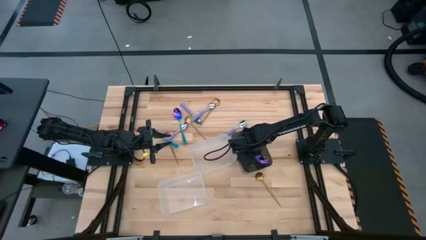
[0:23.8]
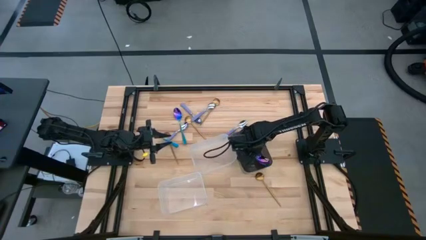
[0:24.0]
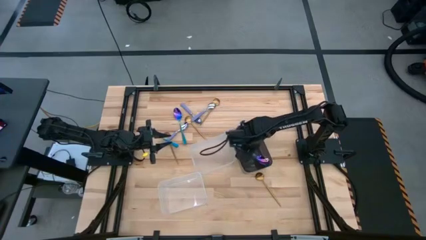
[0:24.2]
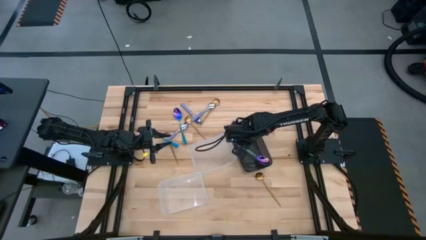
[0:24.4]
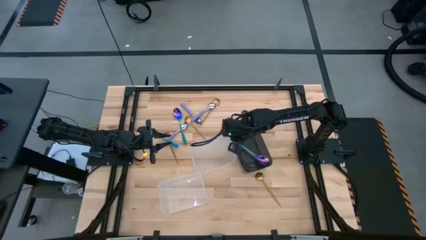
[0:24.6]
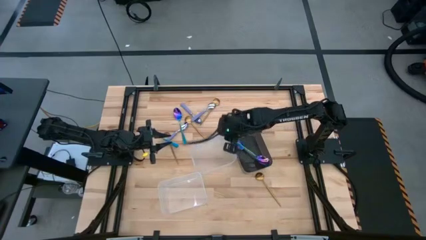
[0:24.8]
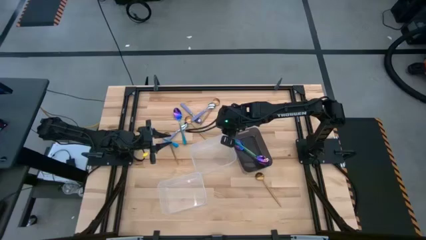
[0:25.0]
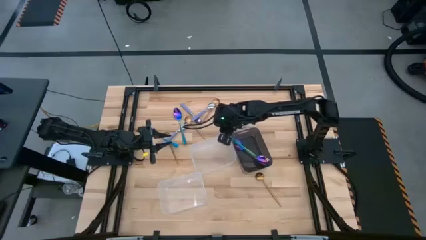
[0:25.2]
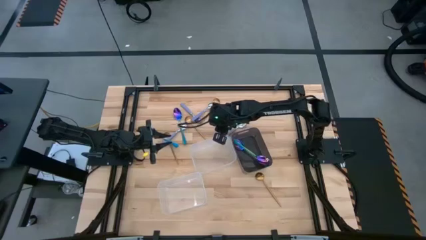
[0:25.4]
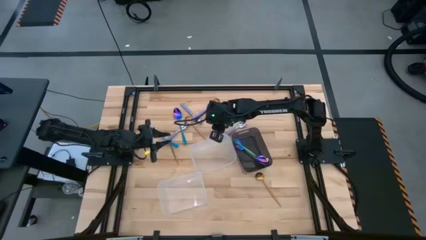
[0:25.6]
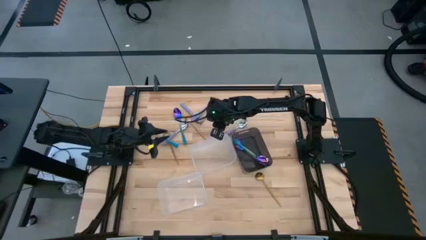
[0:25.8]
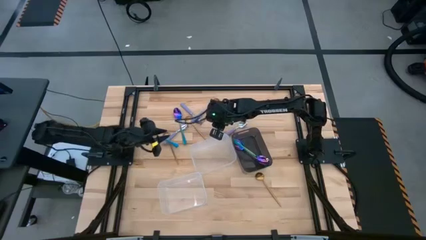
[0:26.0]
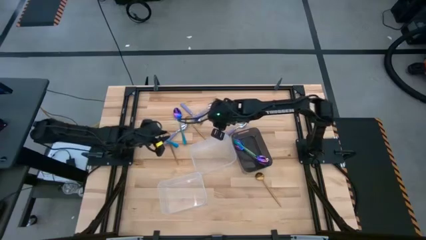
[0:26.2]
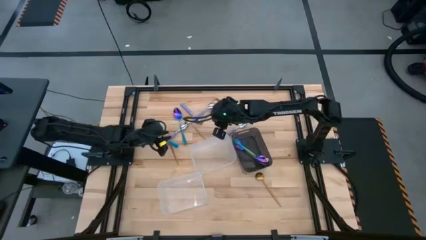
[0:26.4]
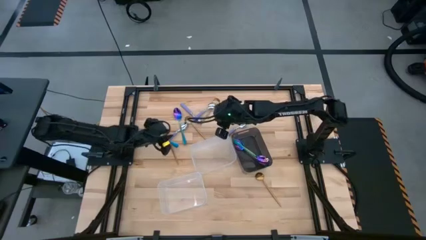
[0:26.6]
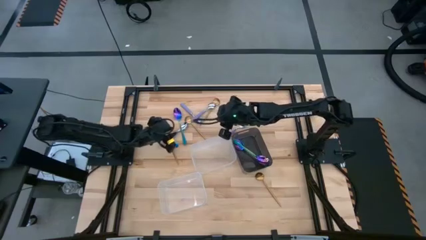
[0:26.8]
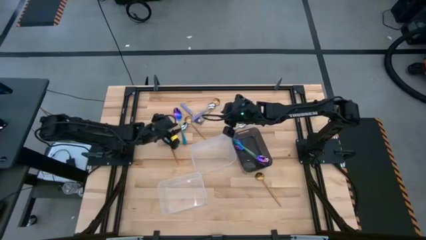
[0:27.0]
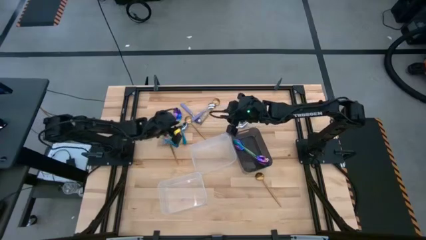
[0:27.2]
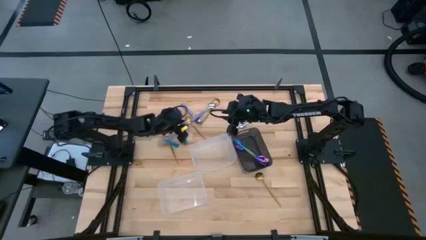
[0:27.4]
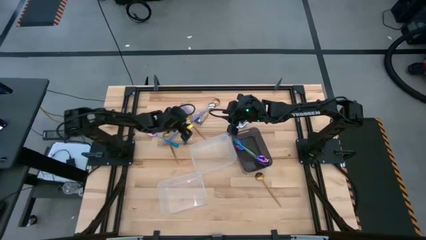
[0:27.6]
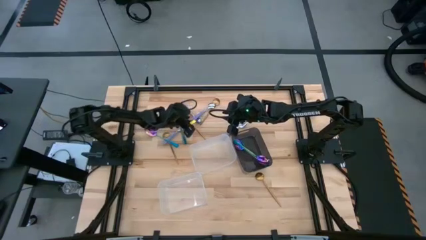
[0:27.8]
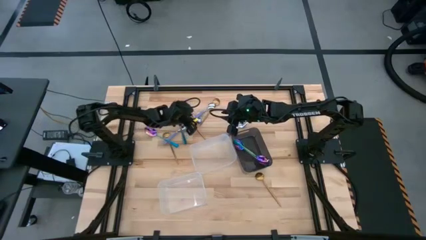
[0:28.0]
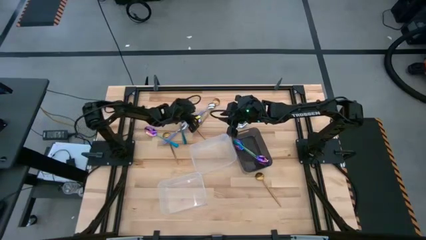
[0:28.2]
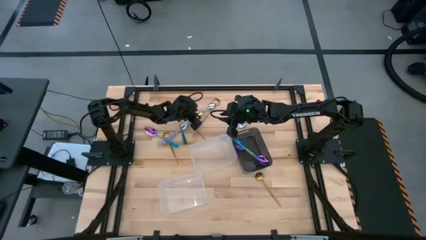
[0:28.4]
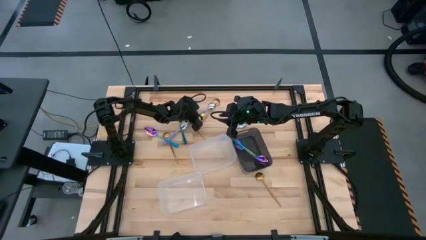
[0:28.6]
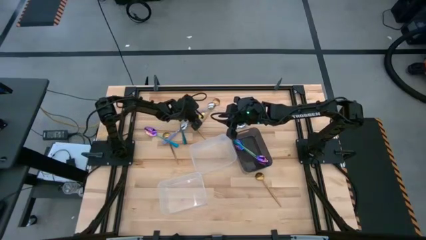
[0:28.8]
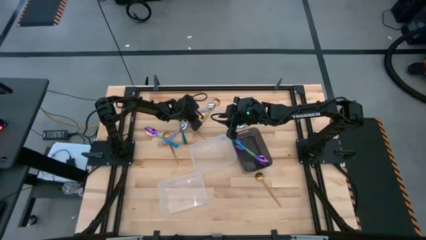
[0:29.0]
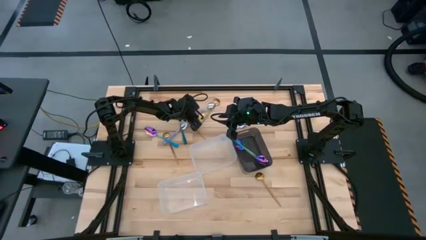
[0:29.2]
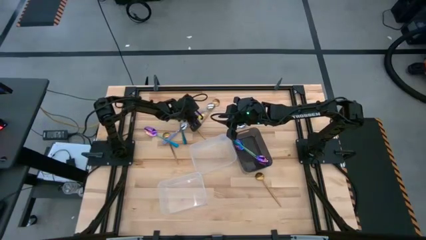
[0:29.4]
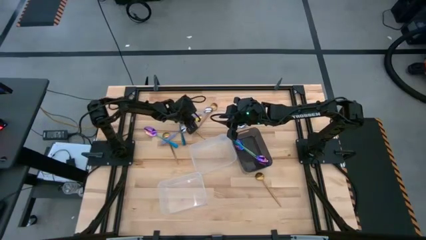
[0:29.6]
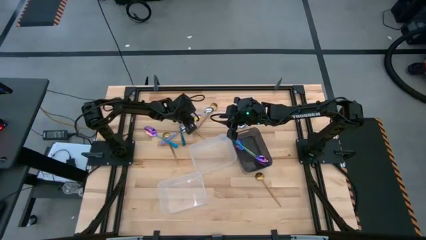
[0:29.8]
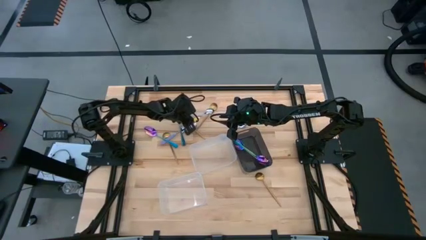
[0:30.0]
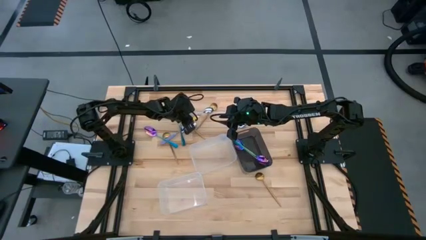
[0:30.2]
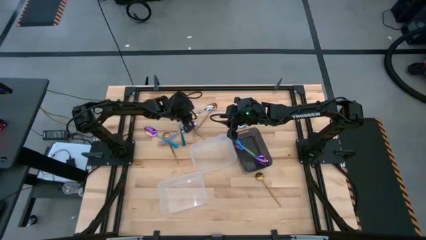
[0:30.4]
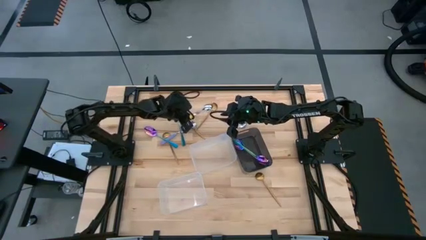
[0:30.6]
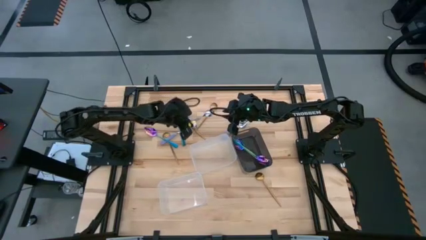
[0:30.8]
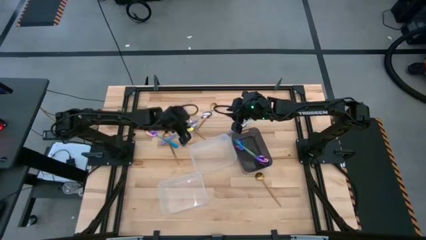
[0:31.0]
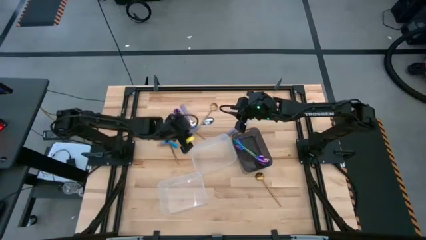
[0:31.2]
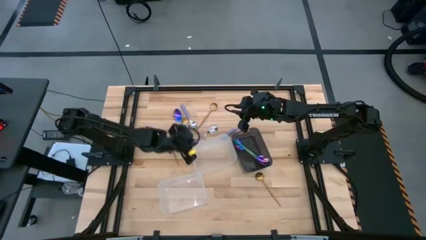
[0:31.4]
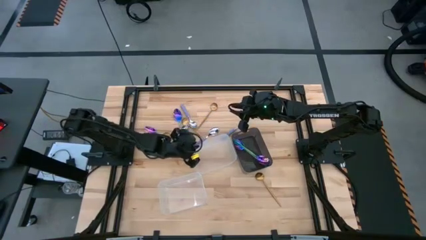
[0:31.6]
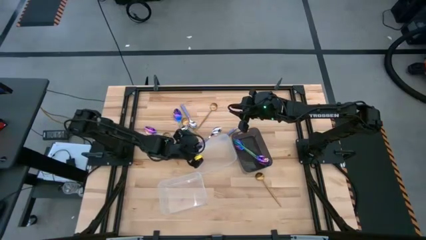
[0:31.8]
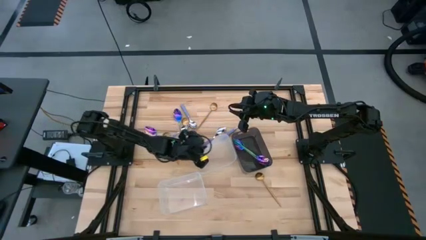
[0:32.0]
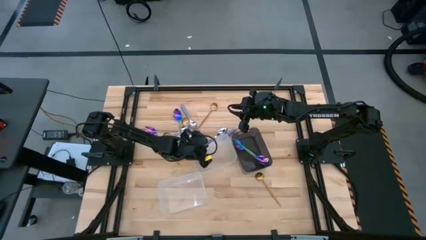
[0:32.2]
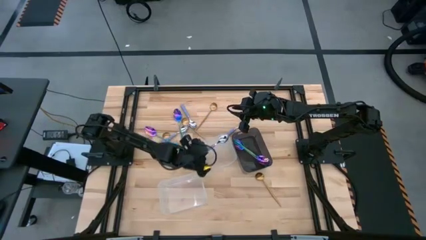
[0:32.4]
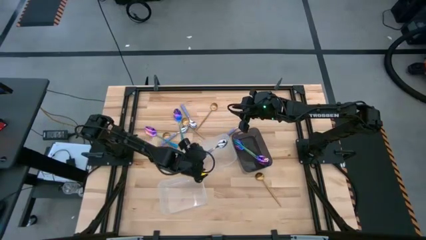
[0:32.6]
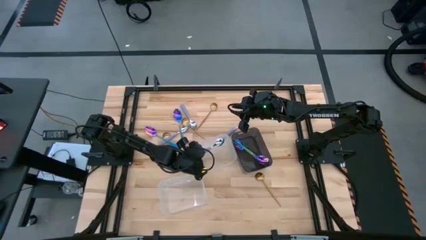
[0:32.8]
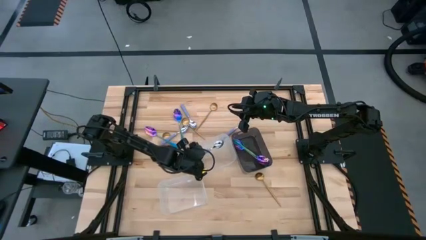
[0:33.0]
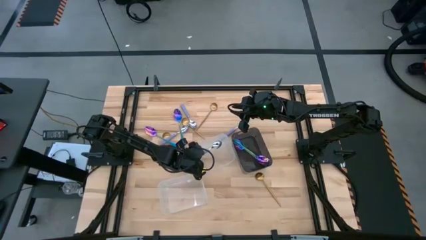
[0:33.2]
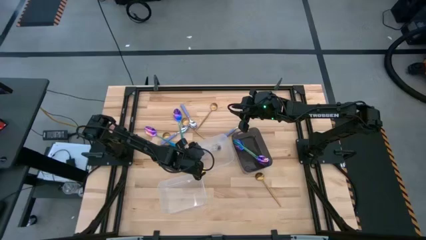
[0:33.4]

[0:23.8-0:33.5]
Task: Sort silverware by color (type)
Put the blue spoon into the top transparent bin

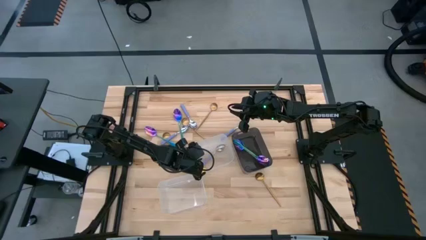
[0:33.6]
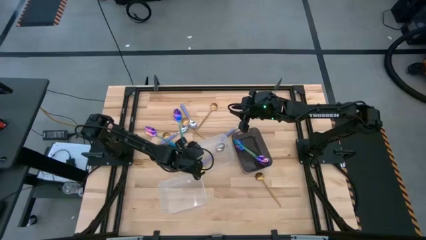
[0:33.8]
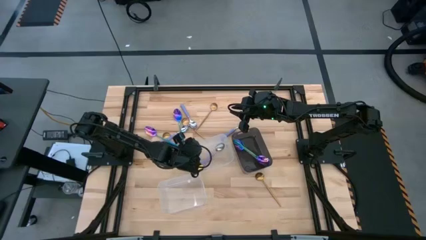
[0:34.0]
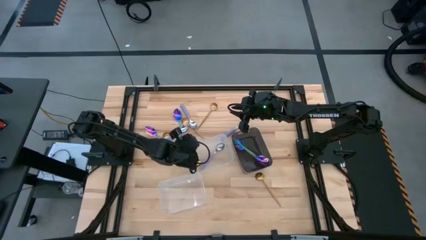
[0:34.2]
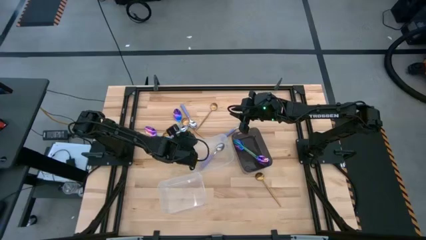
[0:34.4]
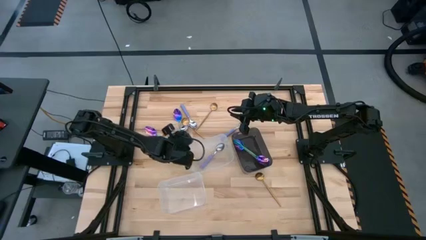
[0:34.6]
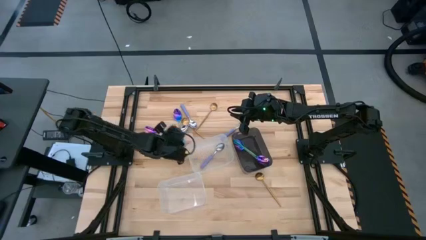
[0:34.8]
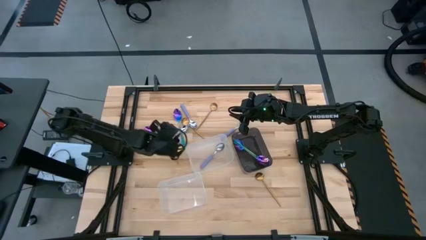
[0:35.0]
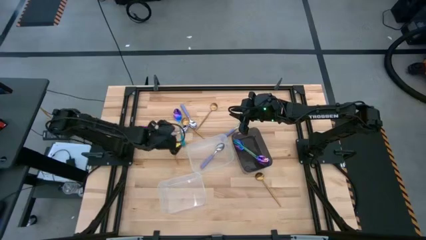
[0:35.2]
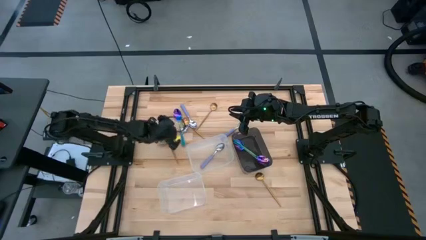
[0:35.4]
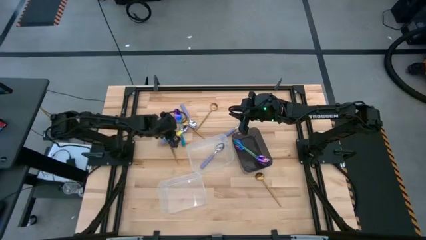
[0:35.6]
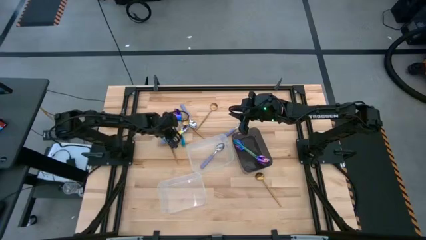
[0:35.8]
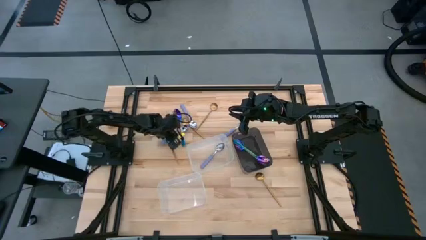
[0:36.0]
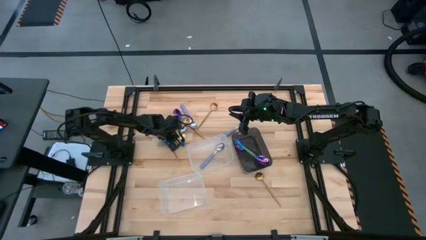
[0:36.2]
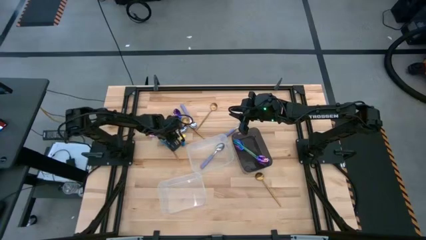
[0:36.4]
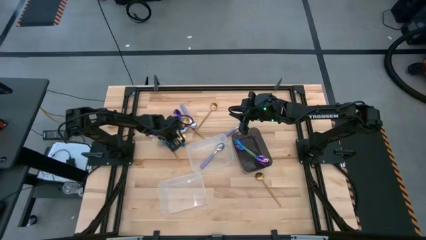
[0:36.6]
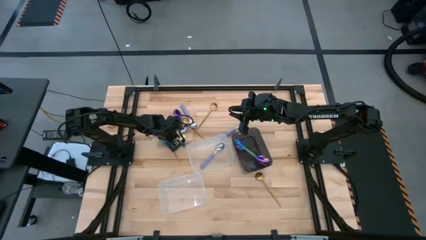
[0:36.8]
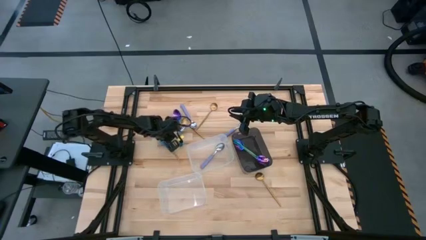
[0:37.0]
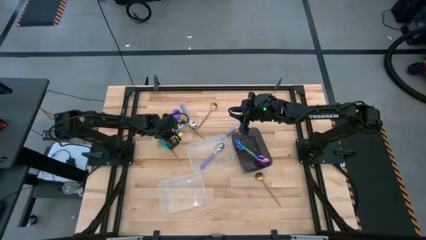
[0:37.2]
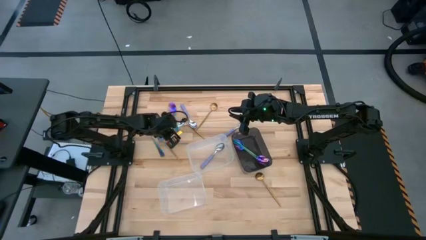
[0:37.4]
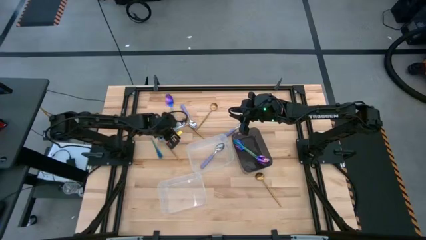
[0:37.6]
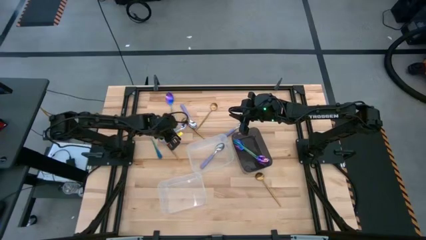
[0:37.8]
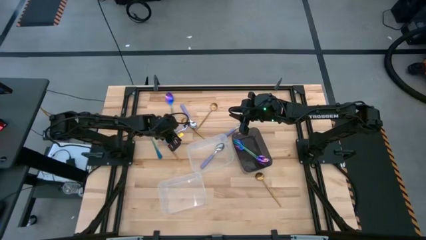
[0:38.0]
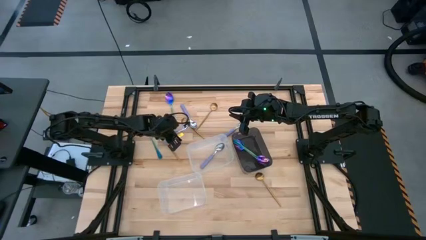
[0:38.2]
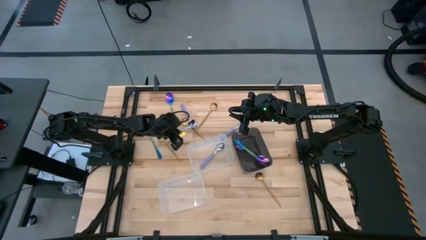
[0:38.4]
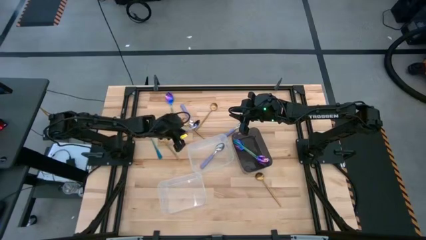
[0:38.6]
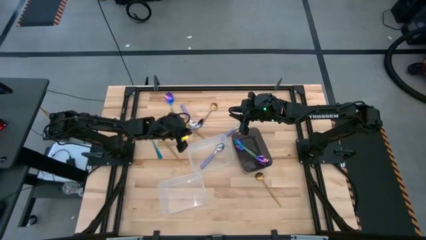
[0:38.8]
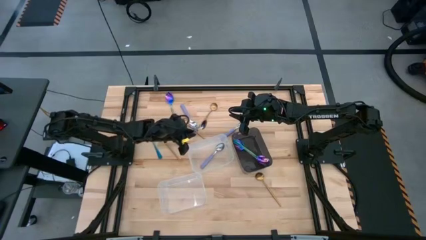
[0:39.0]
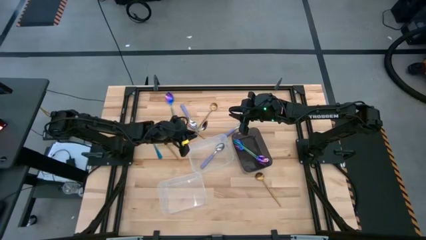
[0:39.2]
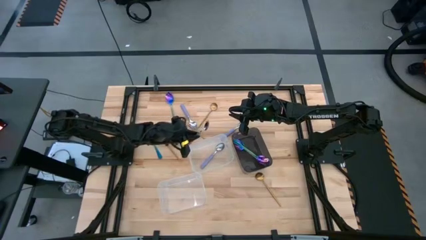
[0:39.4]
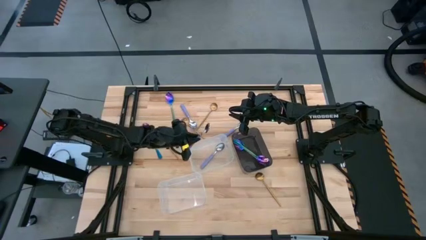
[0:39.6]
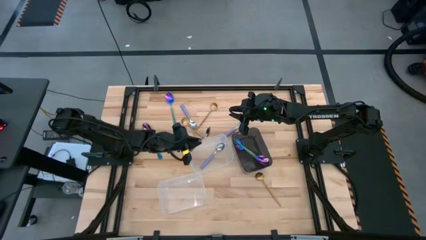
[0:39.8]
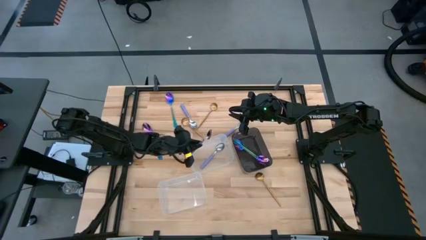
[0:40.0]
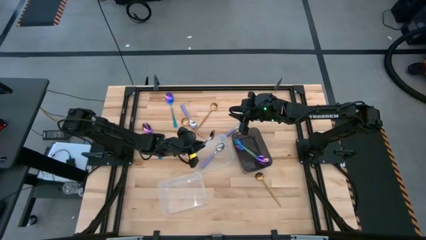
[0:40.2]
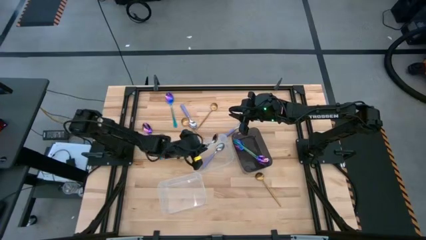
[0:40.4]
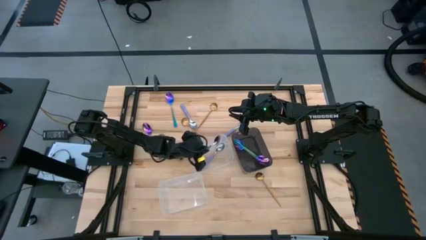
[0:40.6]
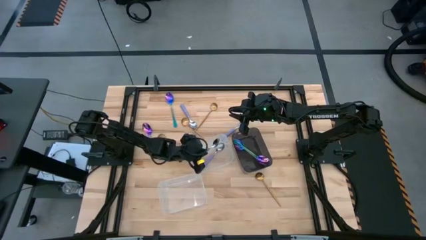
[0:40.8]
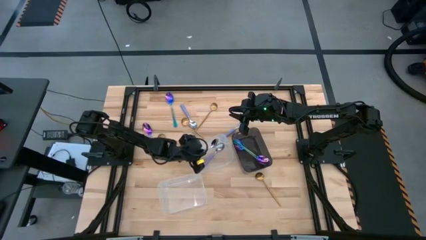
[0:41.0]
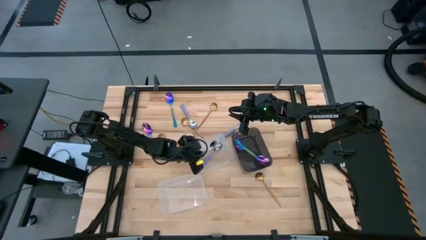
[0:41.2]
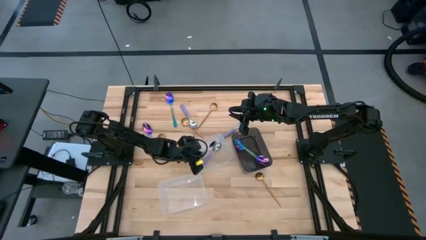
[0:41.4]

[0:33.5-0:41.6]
Put the blue spoon into the top transparent bin
